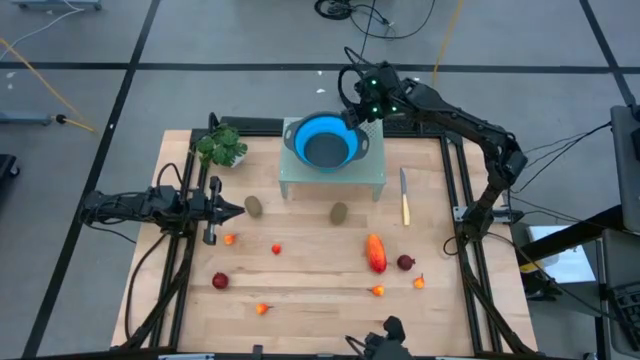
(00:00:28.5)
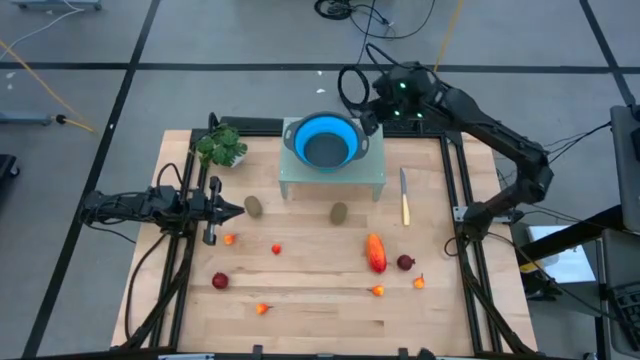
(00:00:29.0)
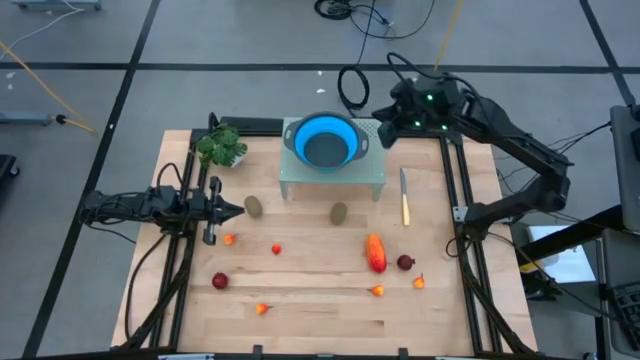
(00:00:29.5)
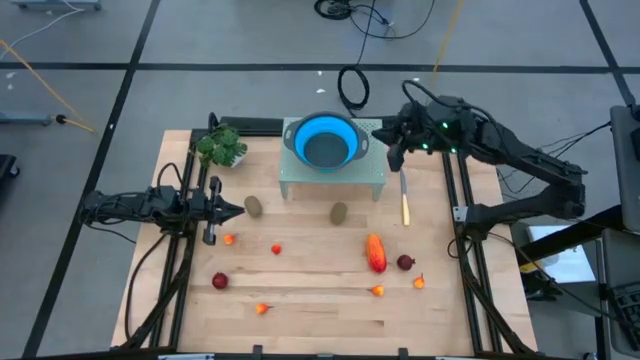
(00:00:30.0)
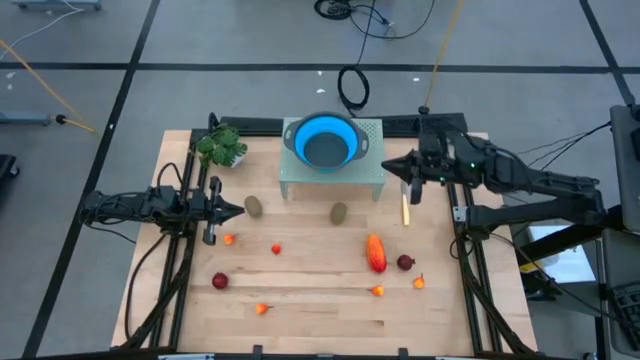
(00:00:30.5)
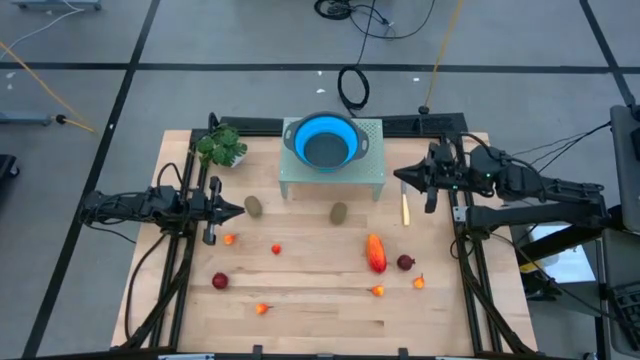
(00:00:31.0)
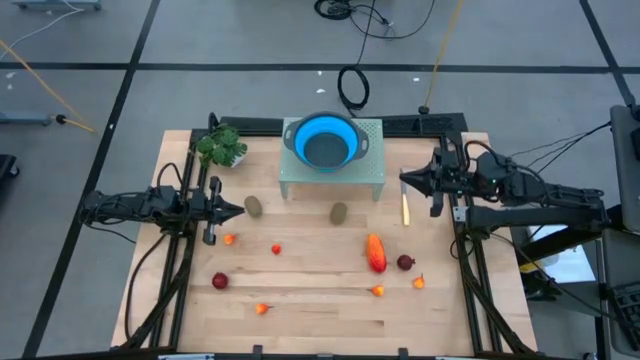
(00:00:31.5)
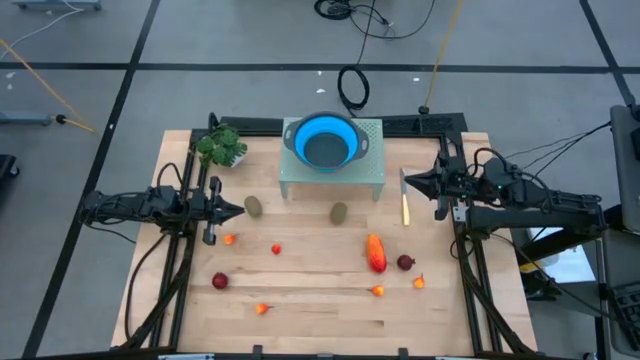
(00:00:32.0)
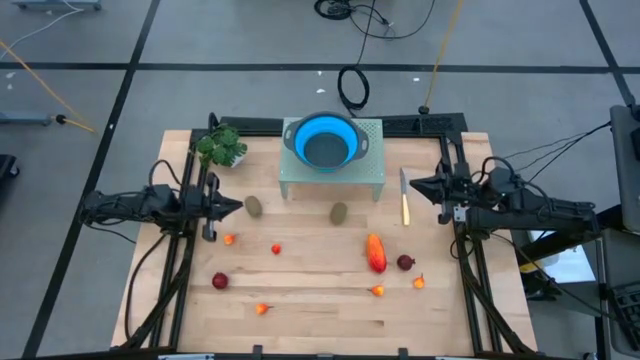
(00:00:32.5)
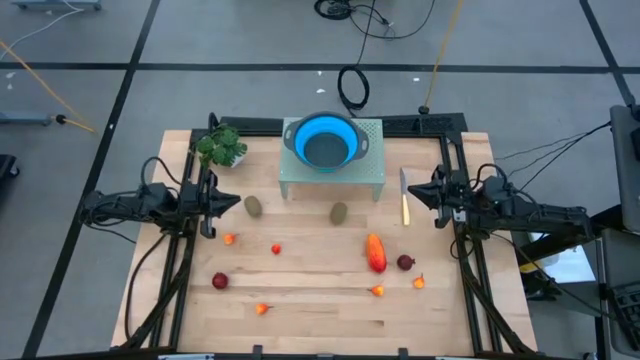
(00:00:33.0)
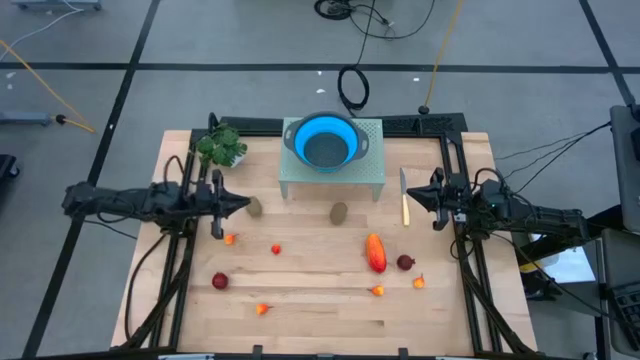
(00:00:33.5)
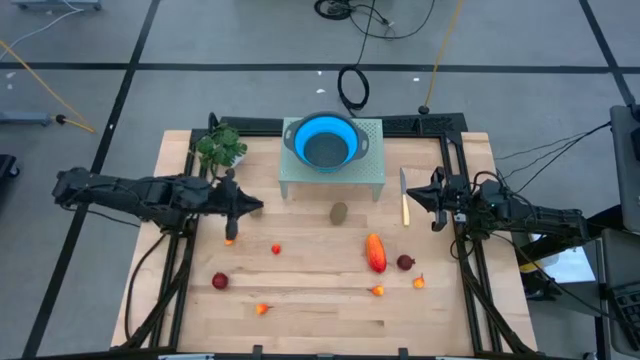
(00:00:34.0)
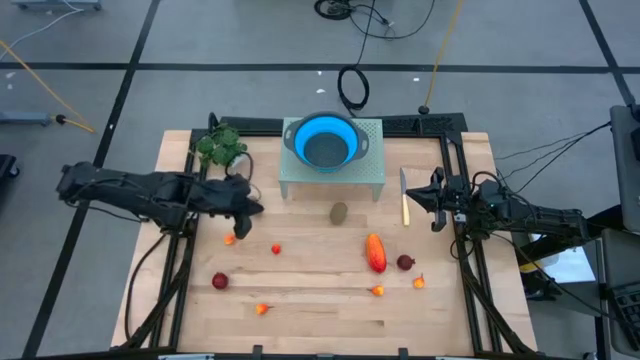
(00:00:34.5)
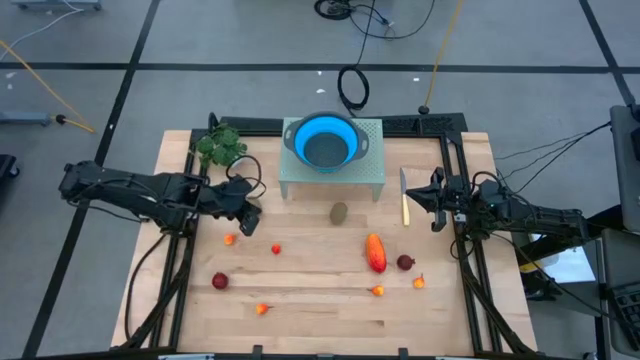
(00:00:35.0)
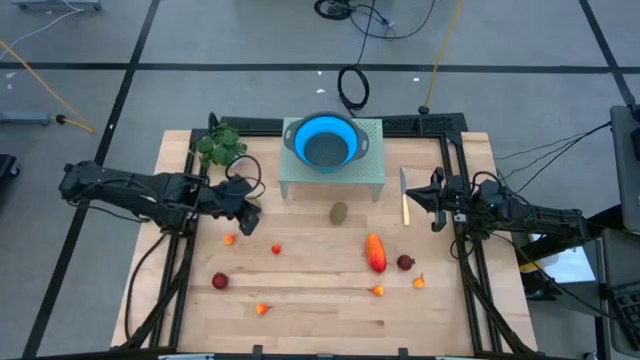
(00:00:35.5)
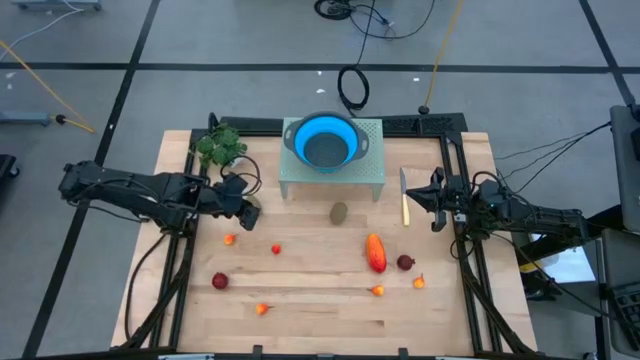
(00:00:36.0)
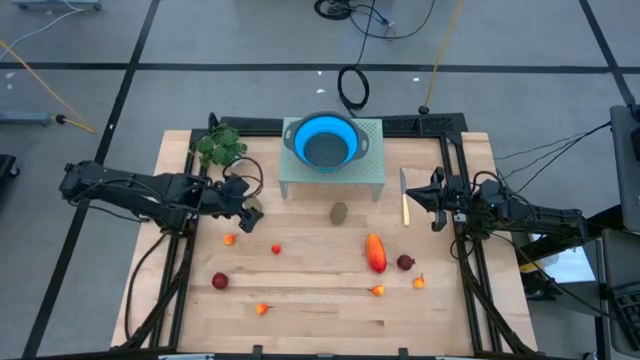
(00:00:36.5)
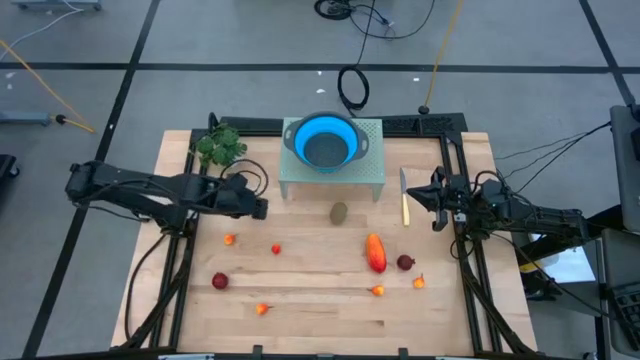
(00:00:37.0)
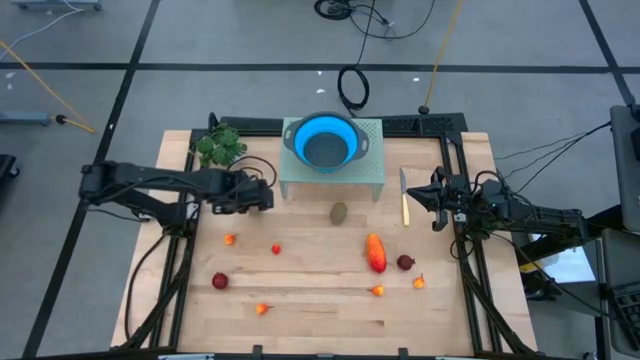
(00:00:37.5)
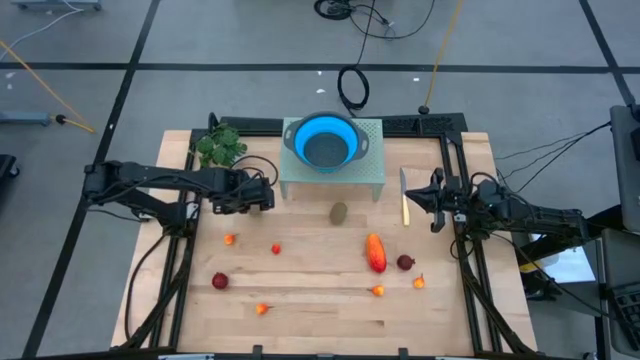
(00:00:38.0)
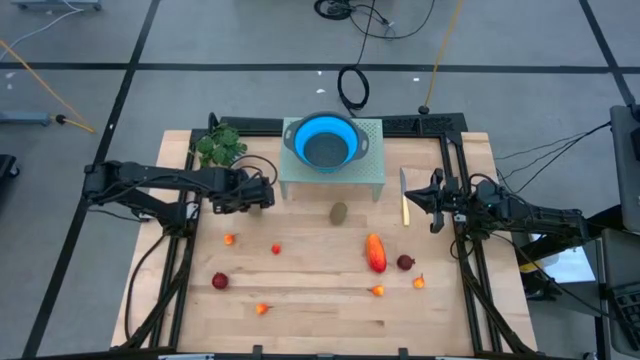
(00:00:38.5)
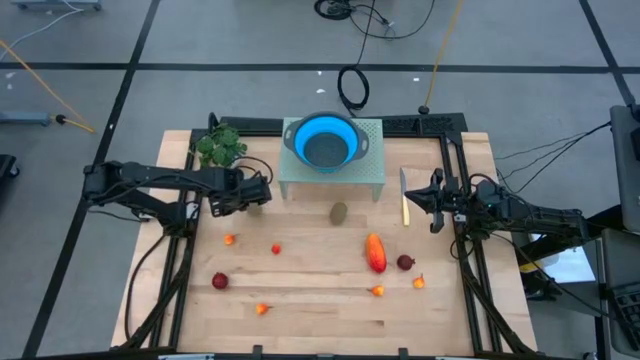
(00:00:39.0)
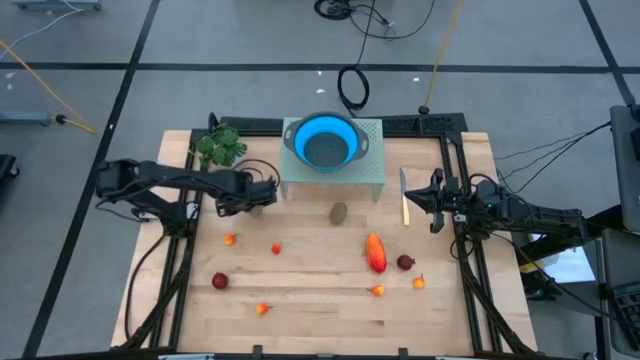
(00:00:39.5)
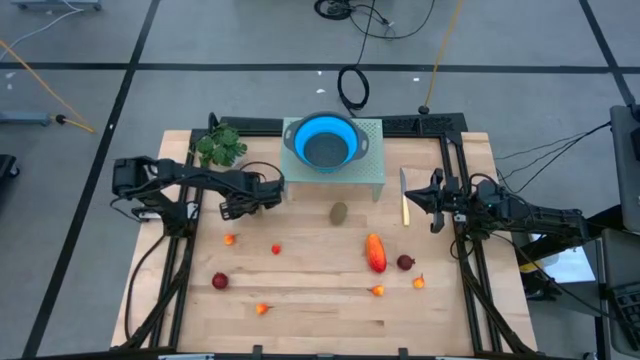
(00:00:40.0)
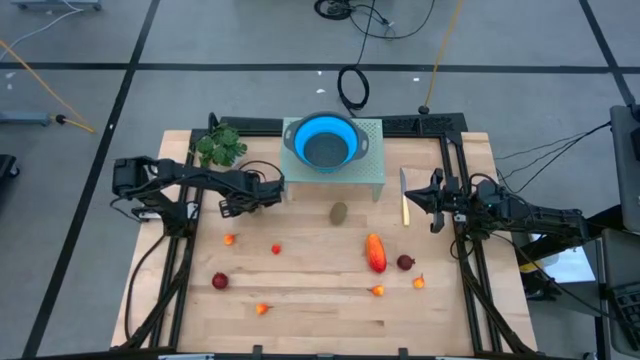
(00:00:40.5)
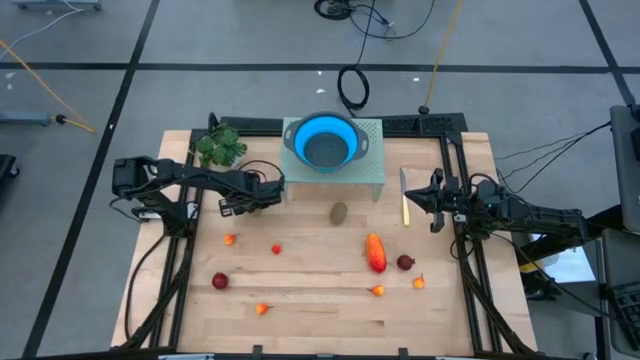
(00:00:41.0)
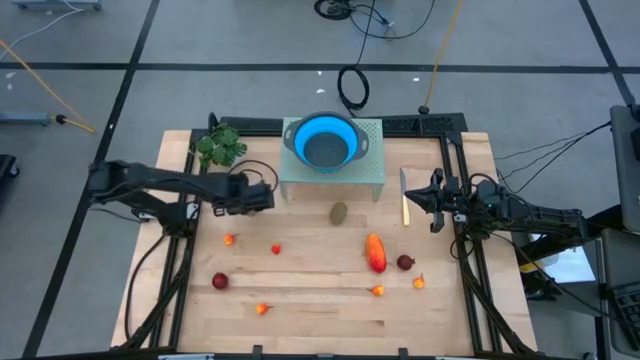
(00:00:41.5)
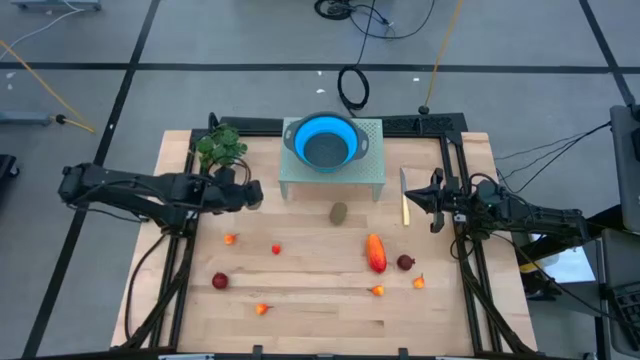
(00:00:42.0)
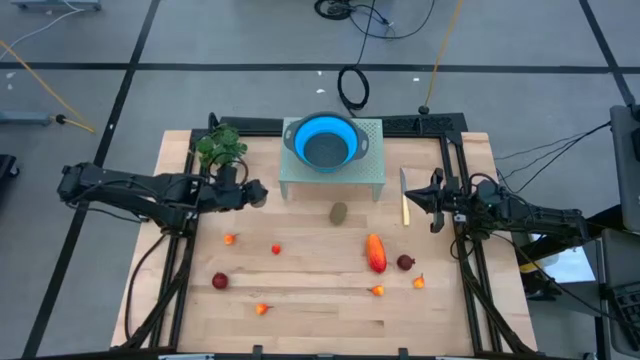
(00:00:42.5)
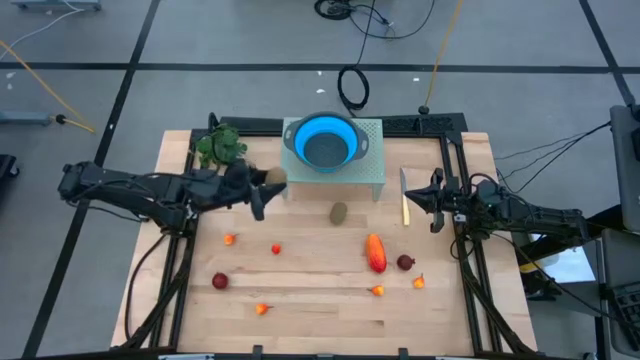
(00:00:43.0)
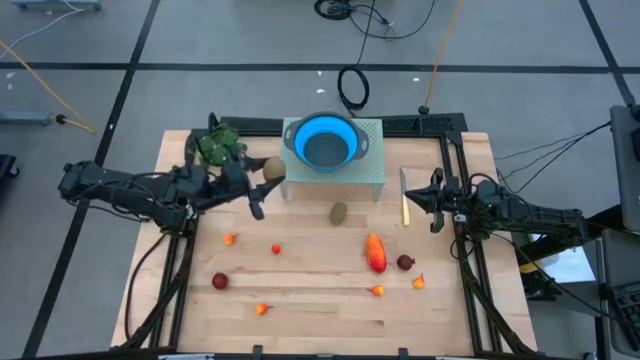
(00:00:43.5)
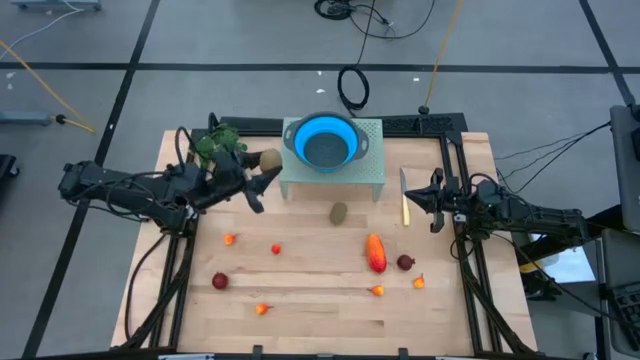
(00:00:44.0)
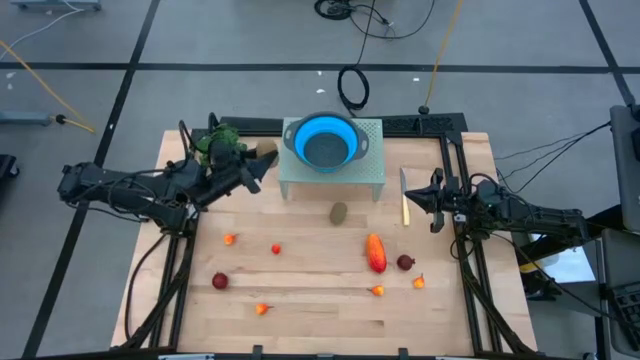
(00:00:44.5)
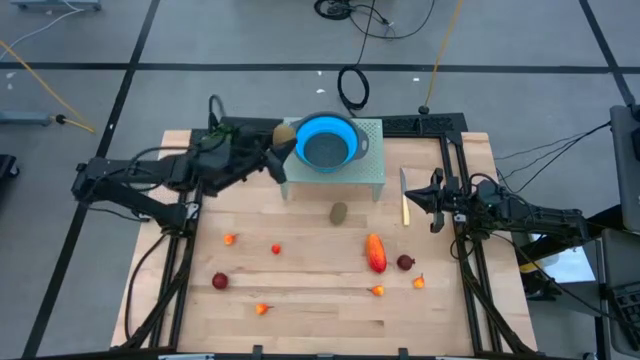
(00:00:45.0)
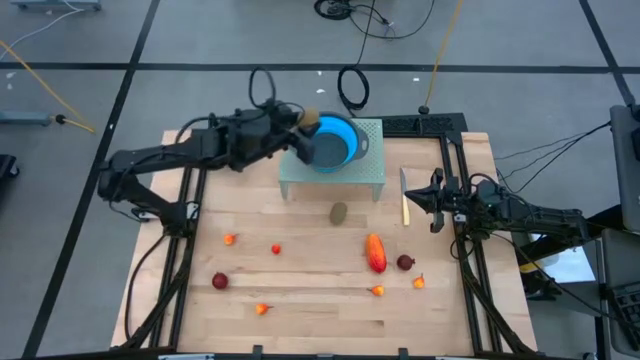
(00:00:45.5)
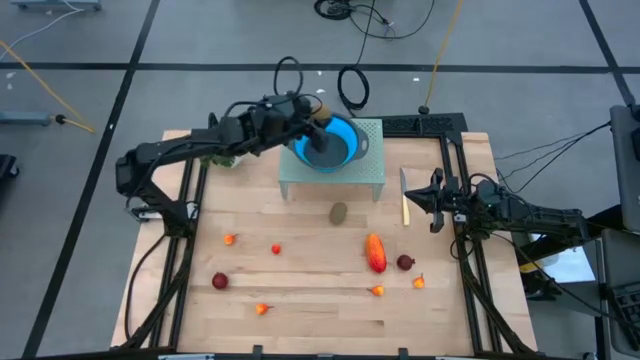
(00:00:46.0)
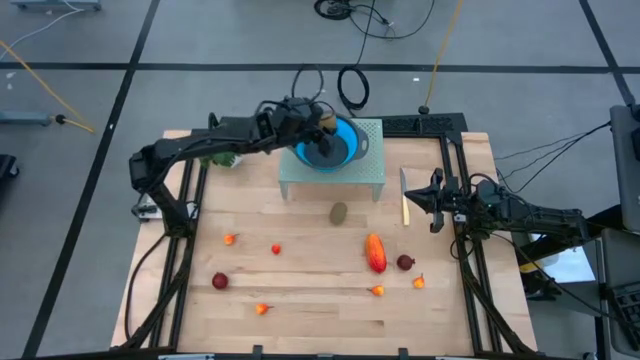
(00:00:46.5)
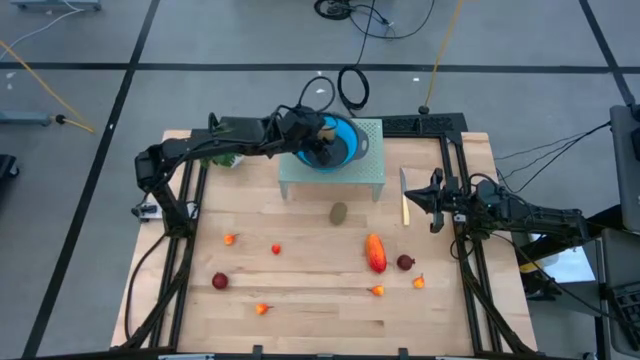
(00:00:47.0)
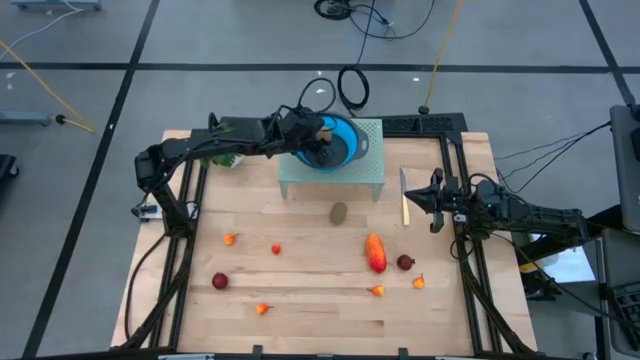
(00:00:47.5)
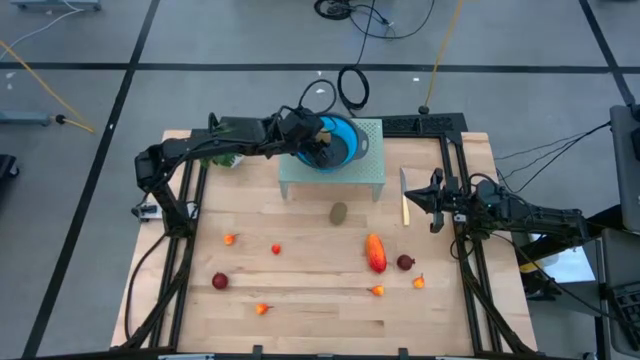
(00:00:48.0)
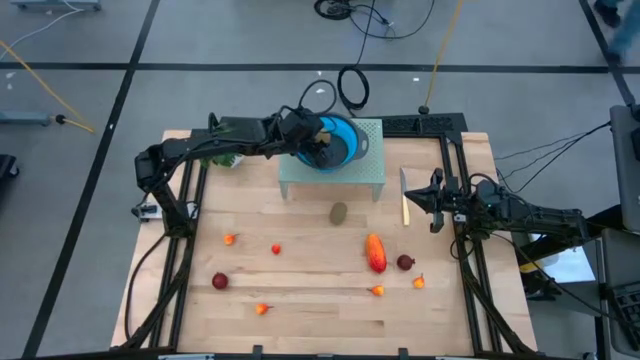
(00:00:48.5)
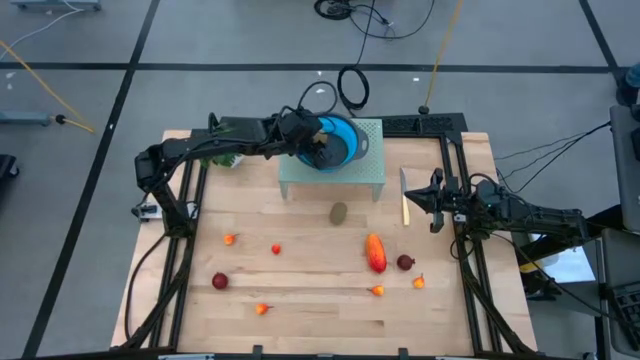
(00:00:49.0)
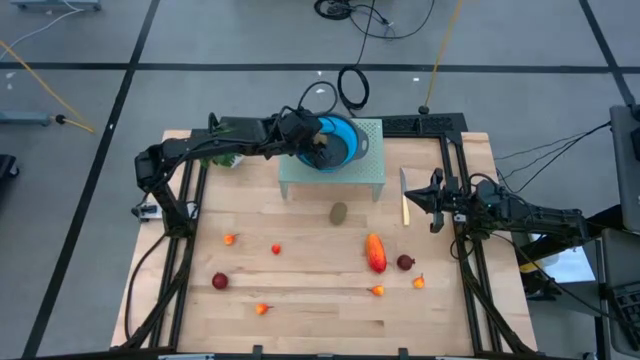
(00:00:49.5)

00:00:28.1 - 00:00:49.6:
Task: Pick & Place Fruit
Put the kiwi into the colander on the shelf
